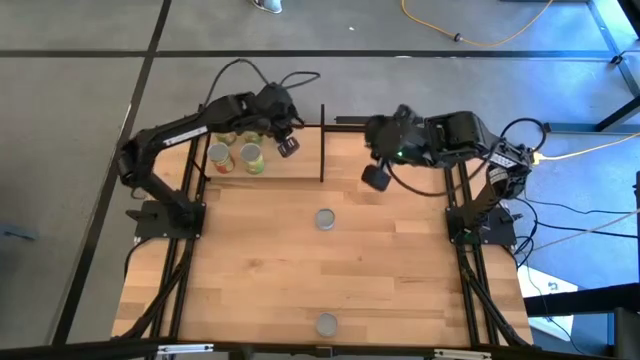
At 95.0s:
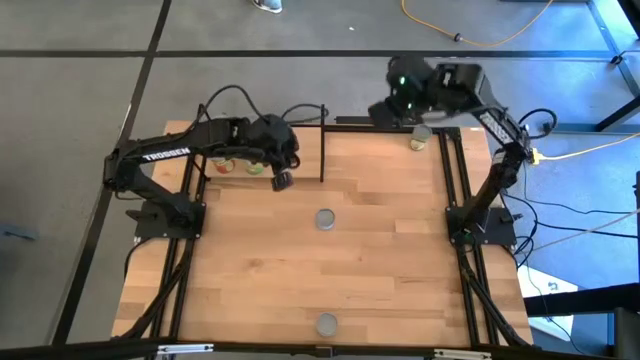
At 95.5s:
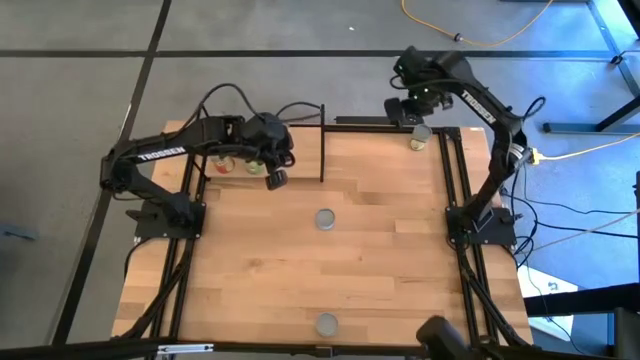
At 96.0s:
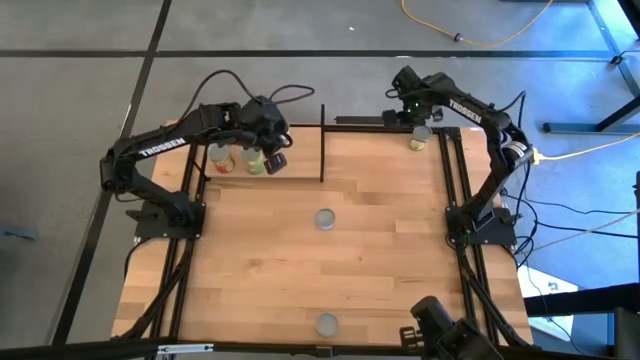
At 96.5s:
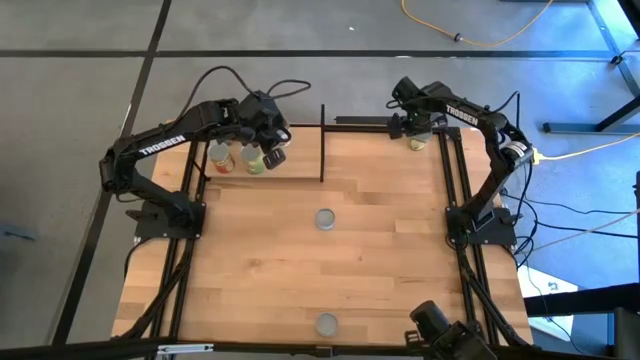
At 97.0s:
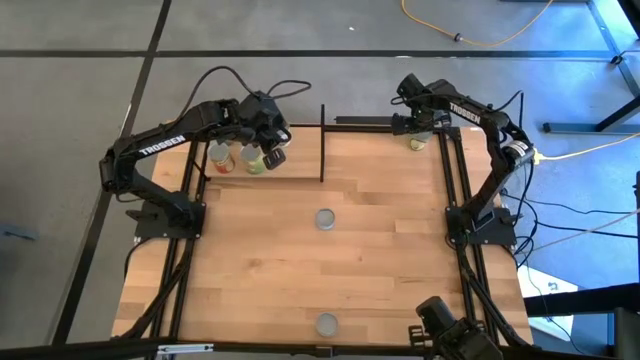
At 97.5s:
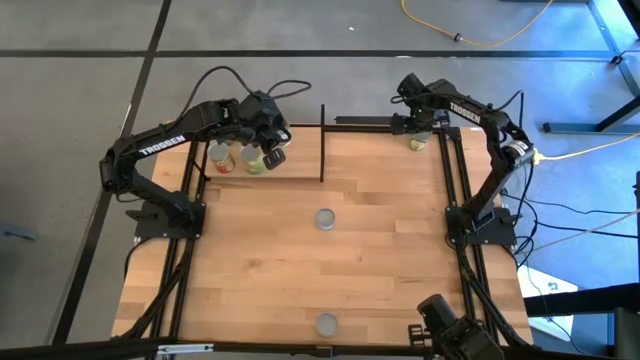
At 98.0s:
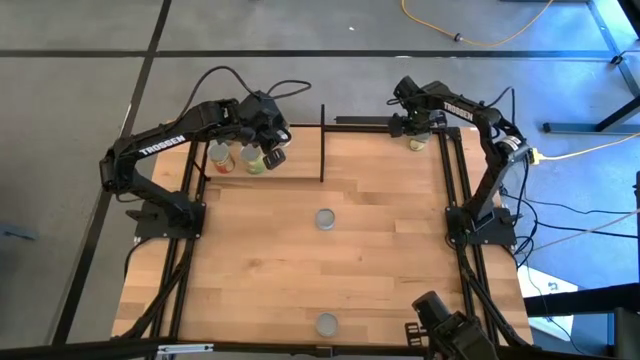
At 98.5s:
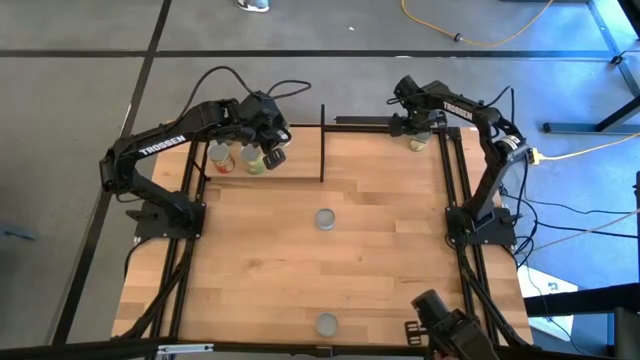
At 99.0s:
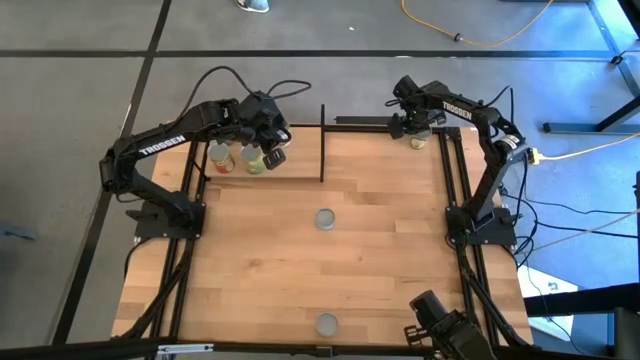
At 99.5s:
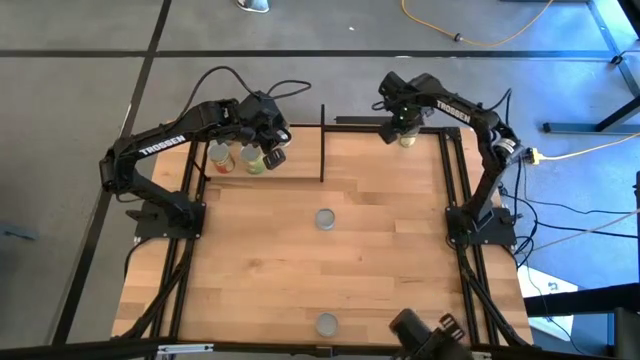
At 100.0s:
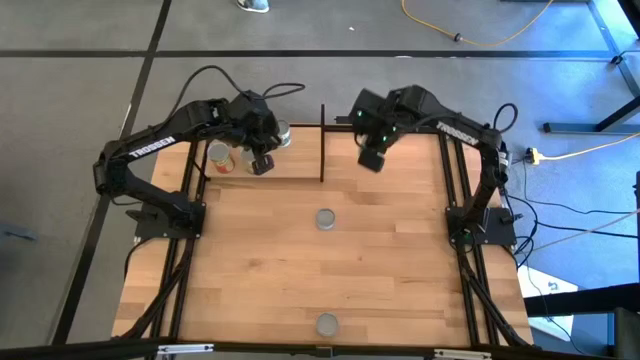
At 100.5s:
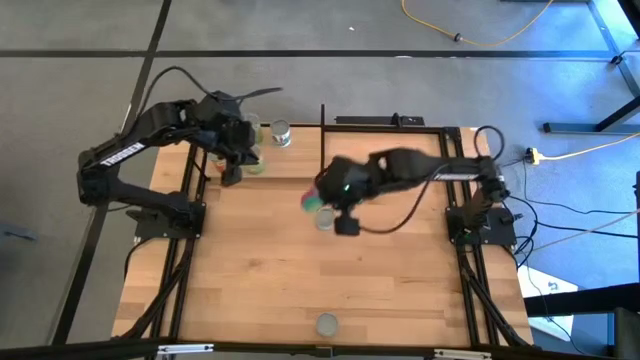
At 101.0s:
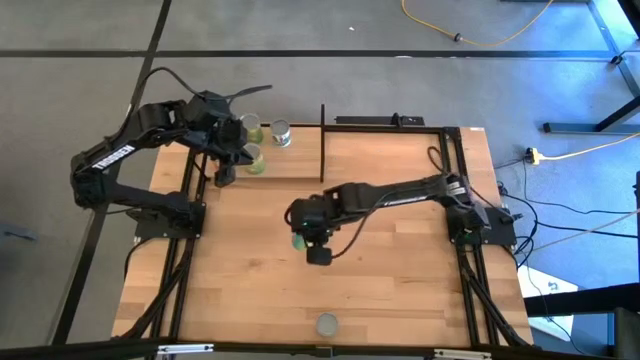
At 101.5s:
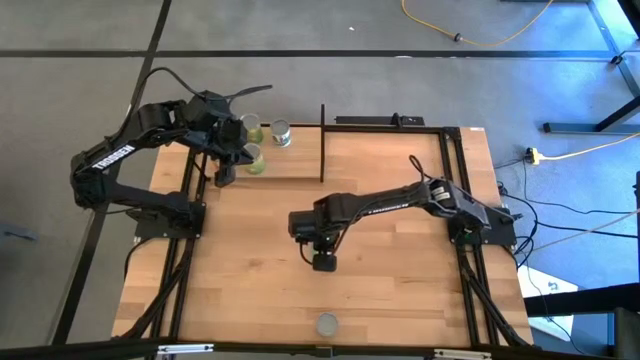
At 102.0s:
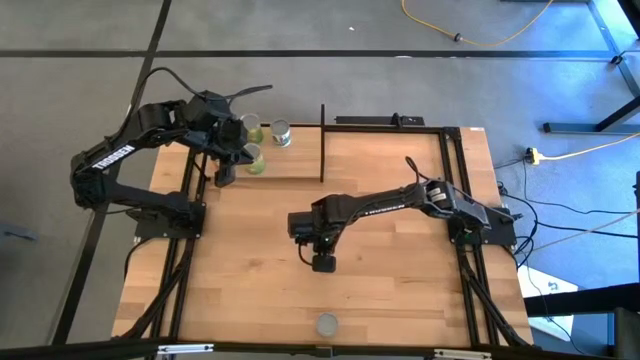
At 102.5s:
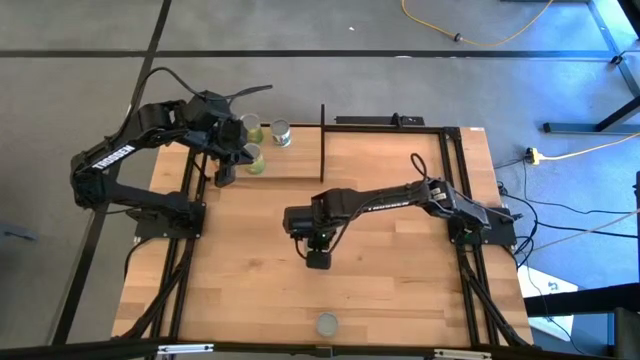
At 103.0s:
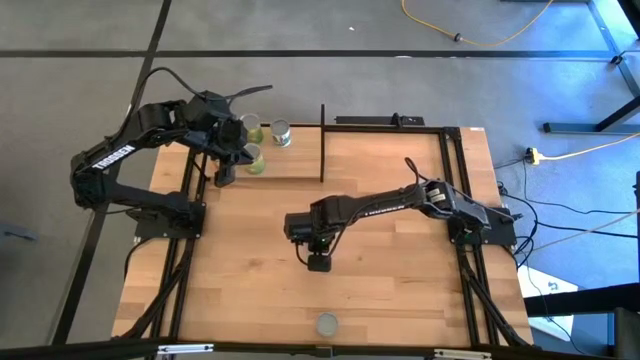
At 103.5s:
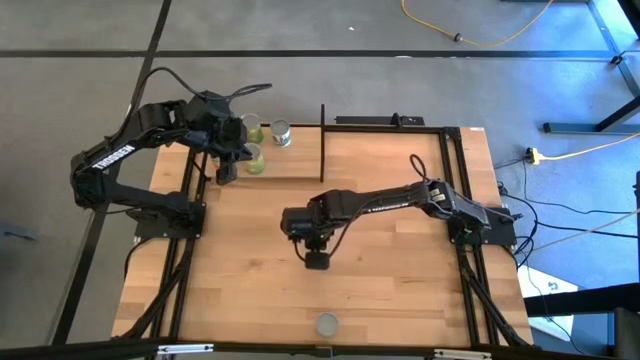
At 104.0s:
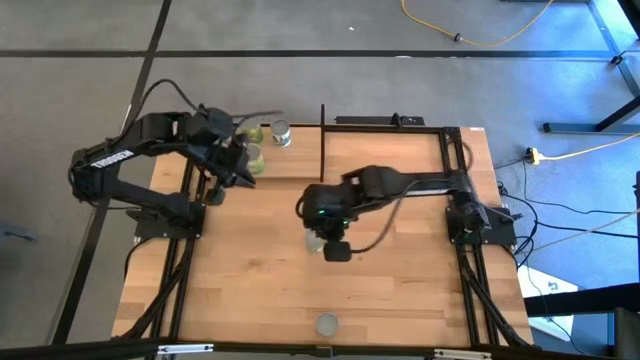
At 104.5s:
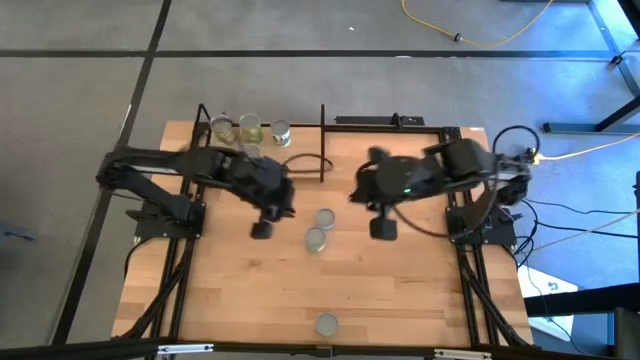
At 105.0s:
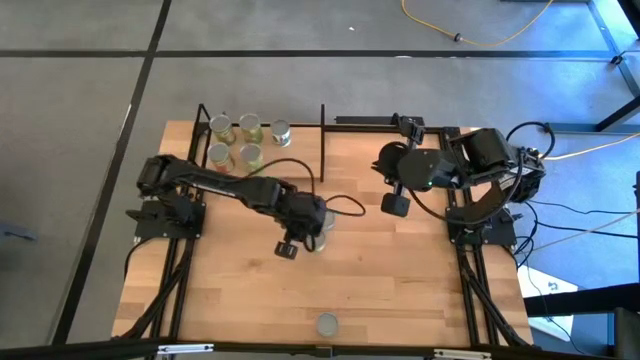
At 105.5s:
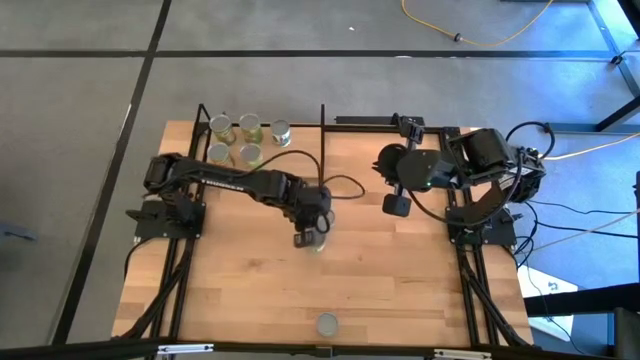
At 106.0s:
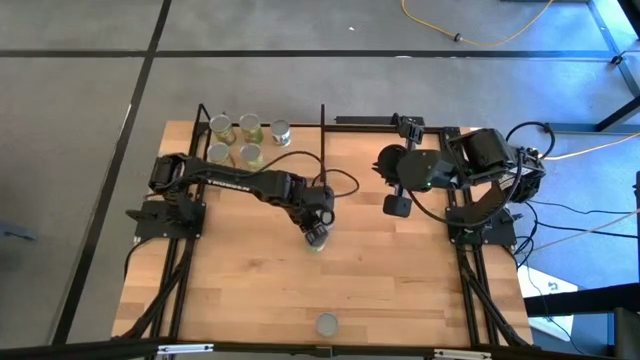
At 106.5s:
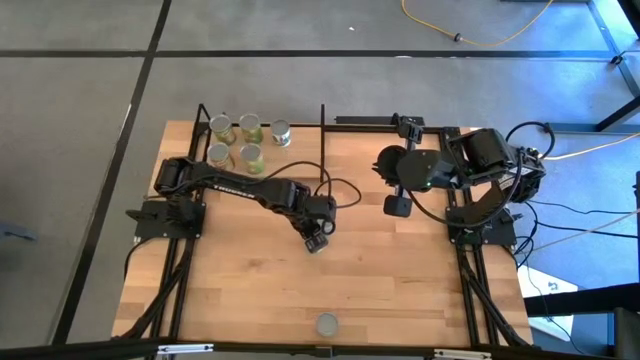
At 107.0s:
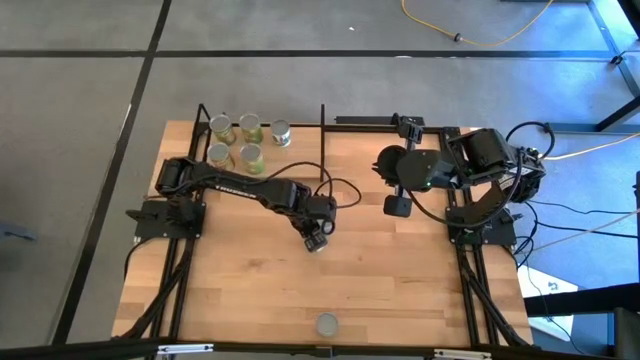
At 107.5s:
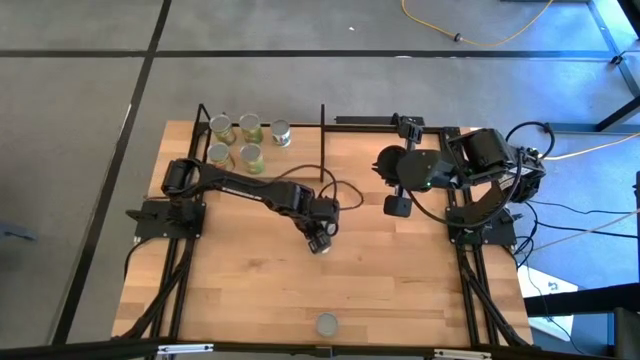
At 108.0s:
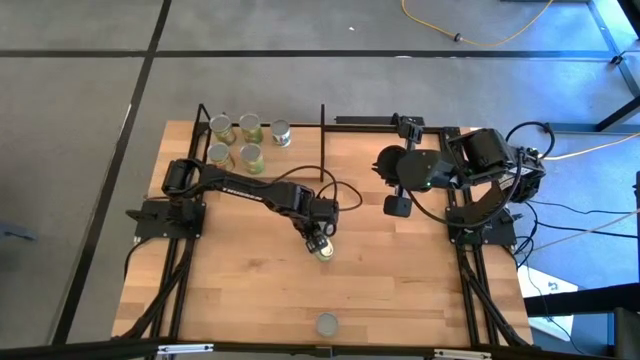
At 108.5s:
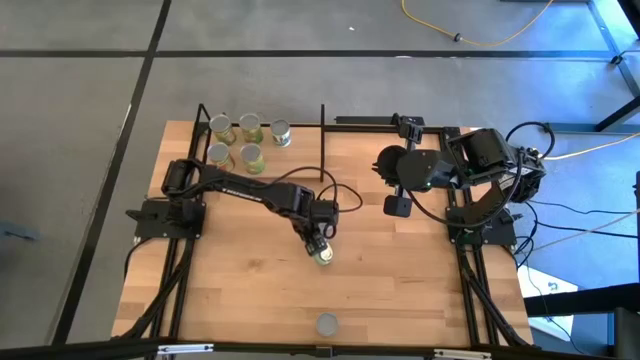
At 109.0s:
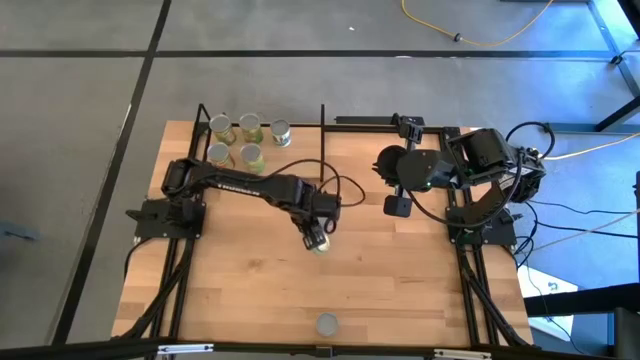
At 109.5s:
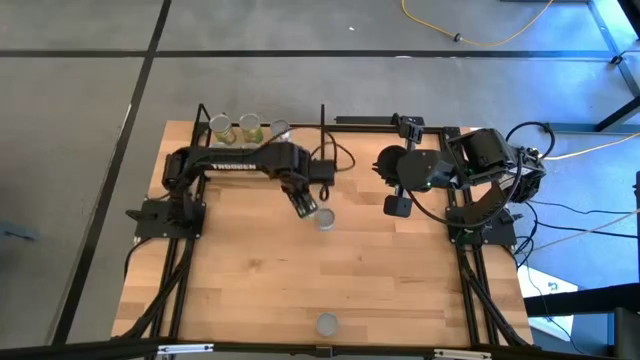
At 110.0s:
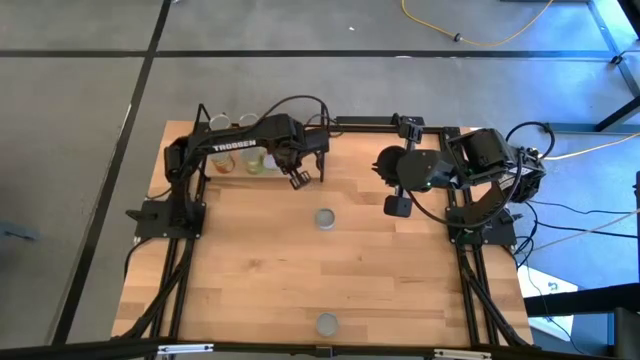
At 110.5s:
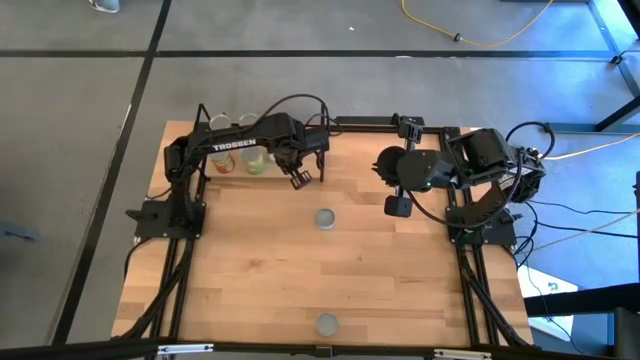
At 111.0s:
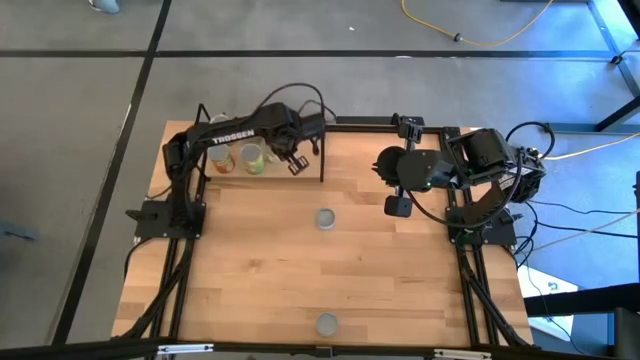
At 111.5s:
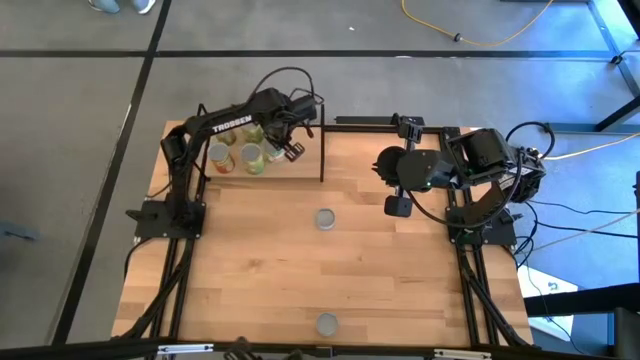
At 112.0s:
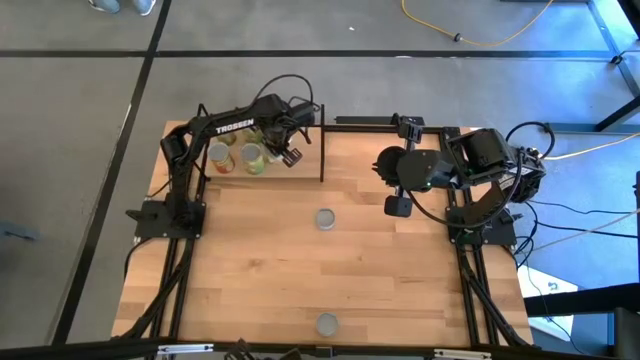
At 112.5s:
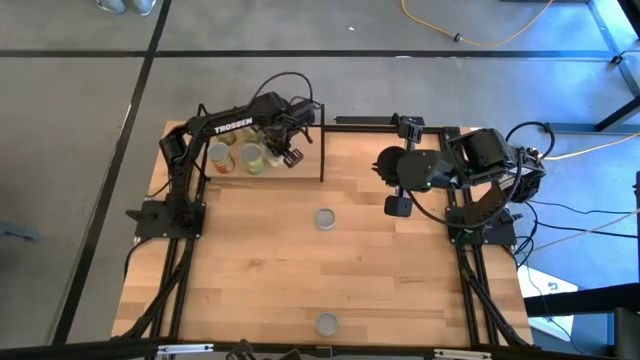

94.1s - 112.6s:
Task: Pick and place cans onto a shelf
Put the canned chicken soup on the shelf

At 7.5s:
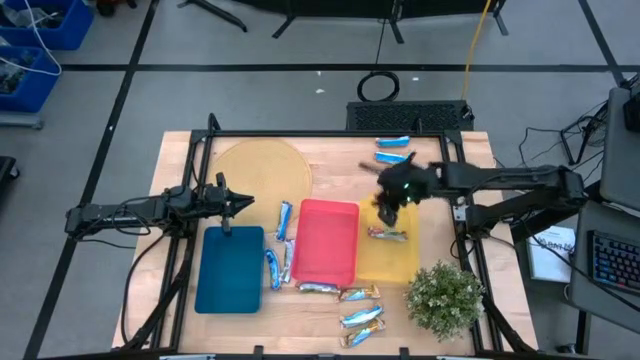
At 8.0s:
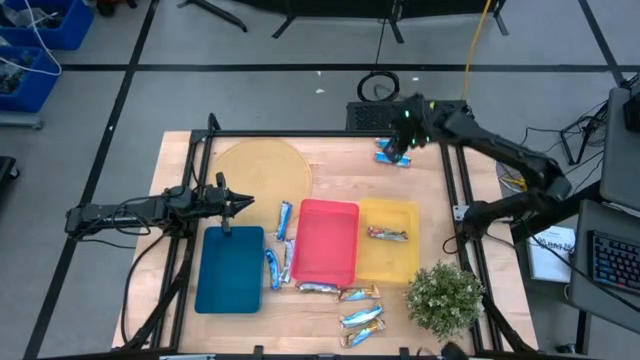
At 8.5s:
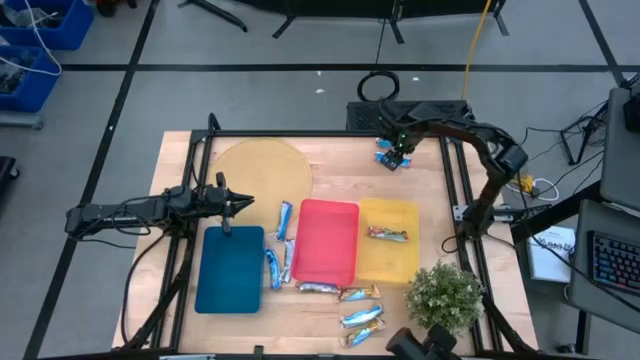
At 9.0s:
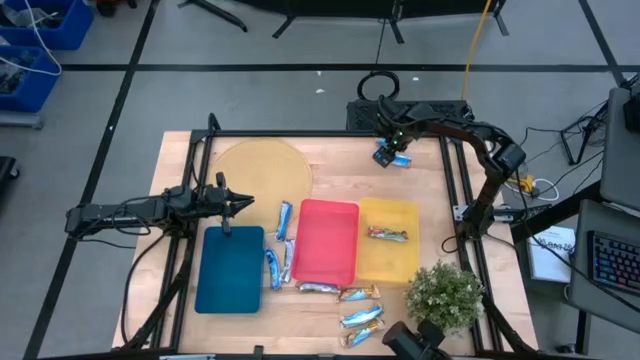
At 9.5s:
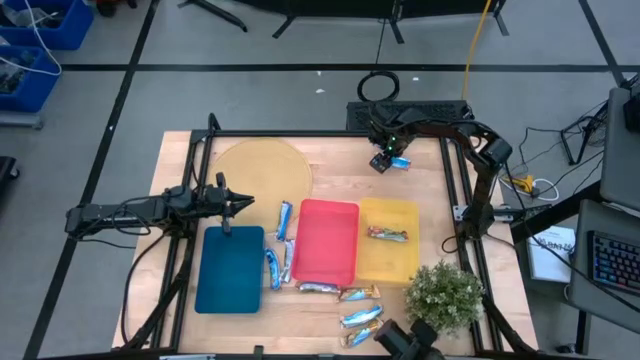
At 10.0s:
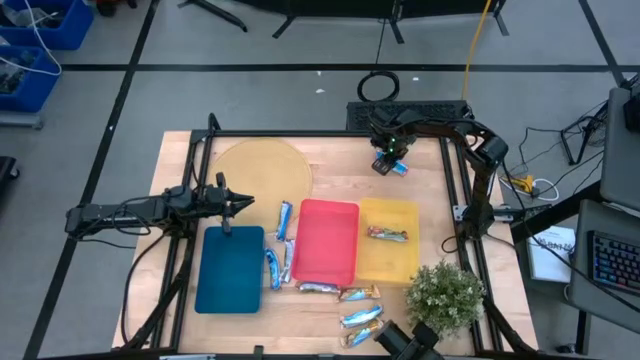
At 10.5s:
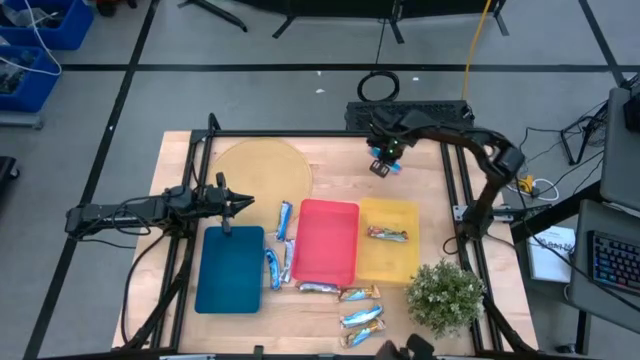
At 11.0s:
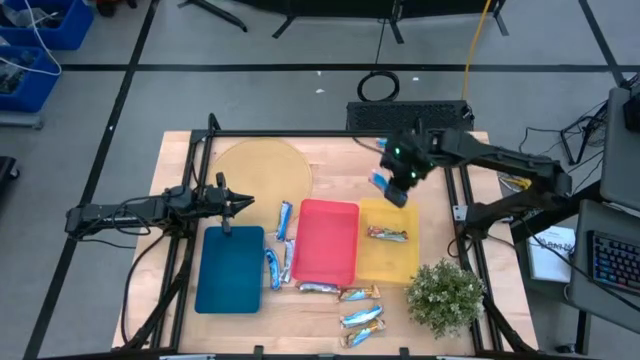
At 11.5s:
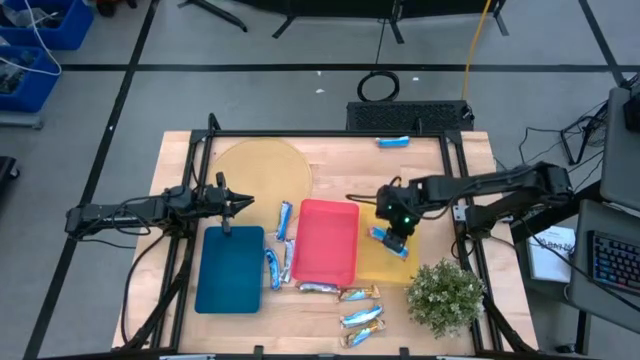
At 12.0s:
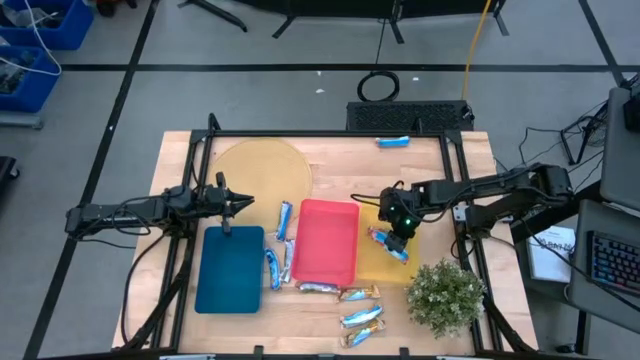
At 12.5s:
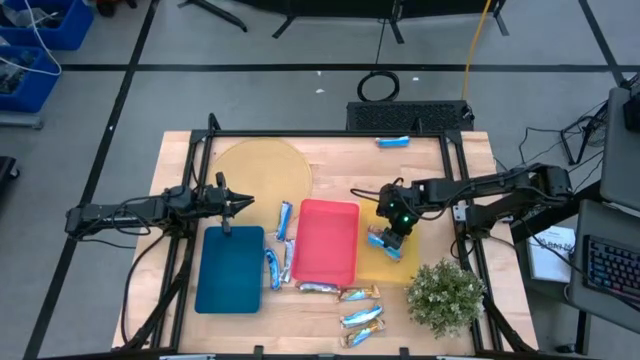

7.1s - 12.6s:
Task: Pick and place Granola Bars by type
Put the red granola bar into the yellow bin
